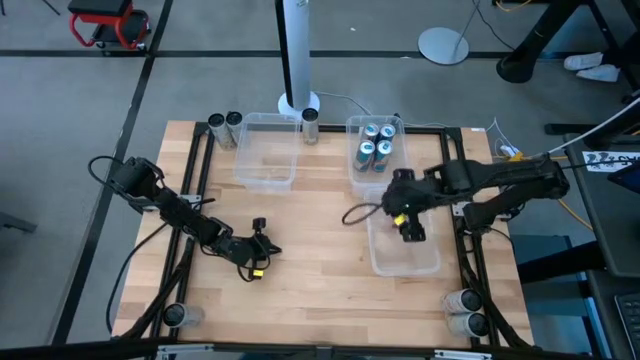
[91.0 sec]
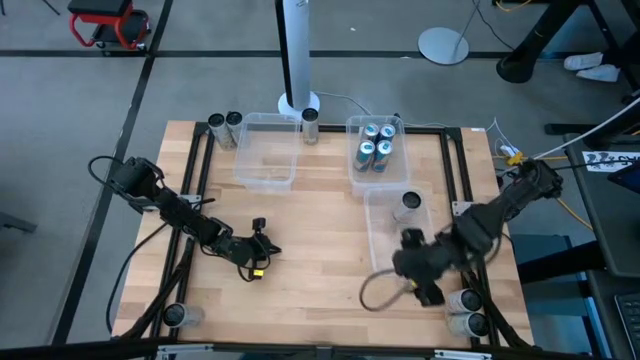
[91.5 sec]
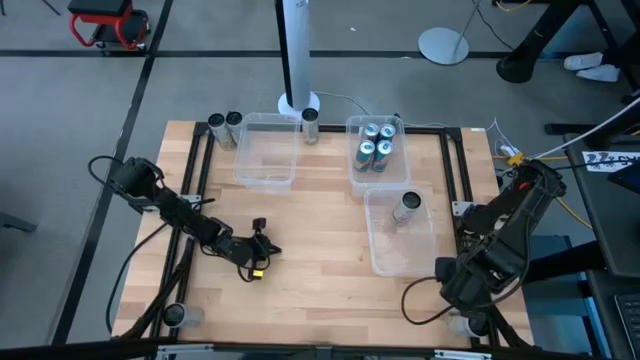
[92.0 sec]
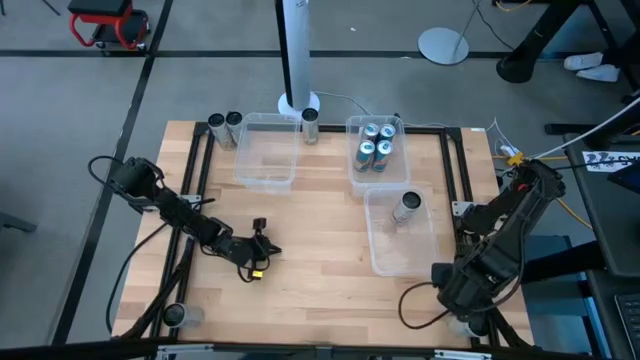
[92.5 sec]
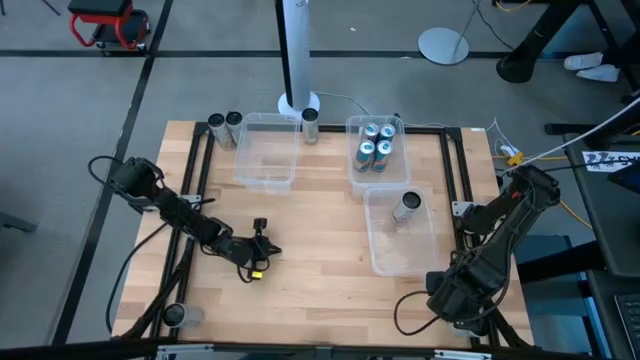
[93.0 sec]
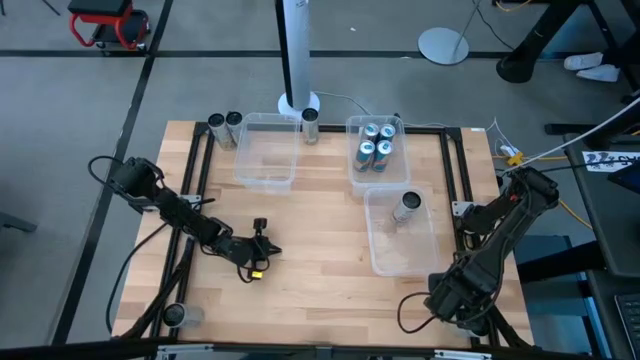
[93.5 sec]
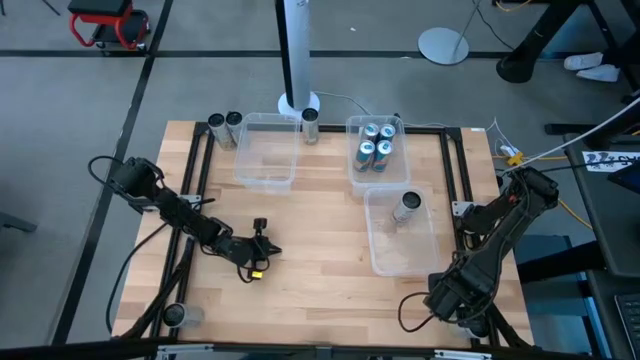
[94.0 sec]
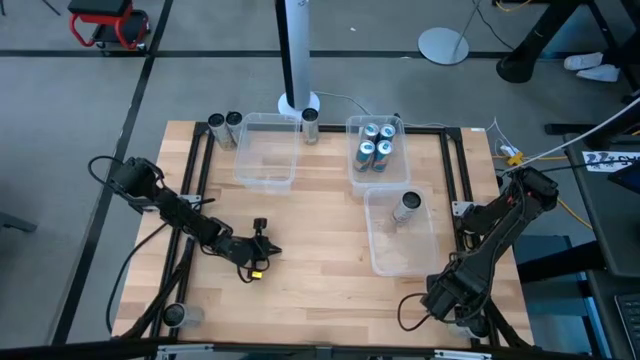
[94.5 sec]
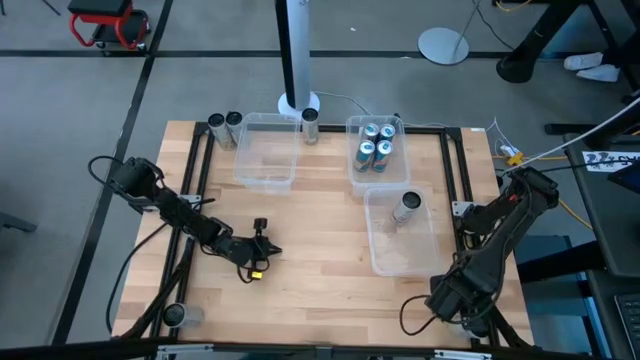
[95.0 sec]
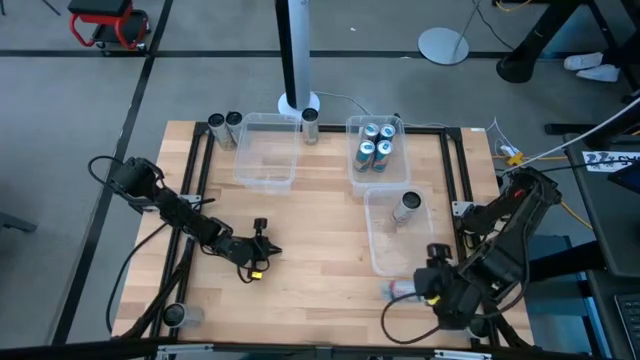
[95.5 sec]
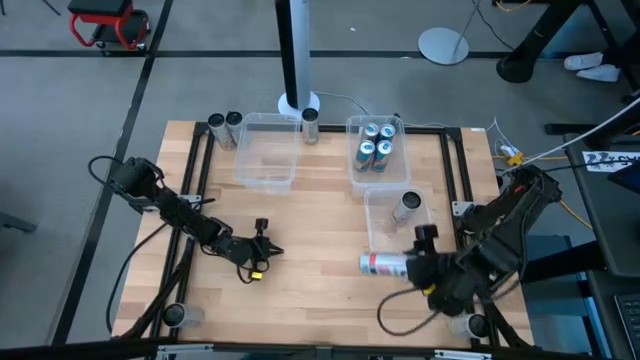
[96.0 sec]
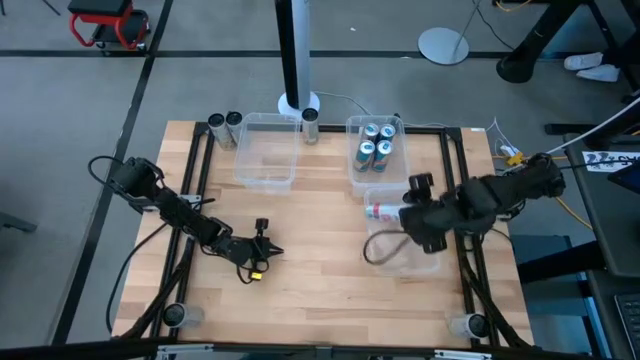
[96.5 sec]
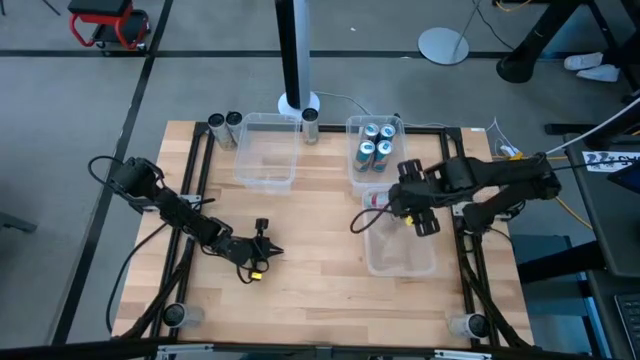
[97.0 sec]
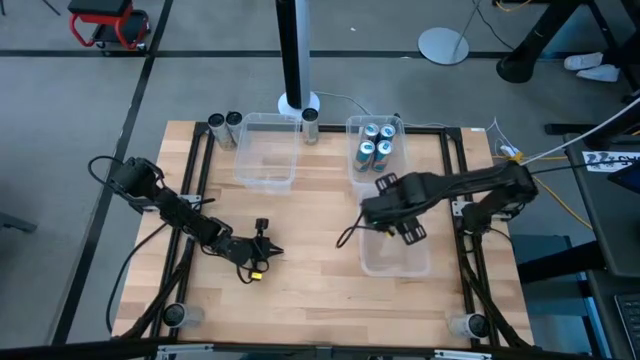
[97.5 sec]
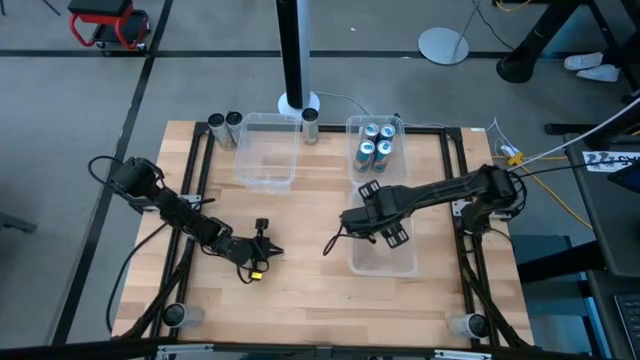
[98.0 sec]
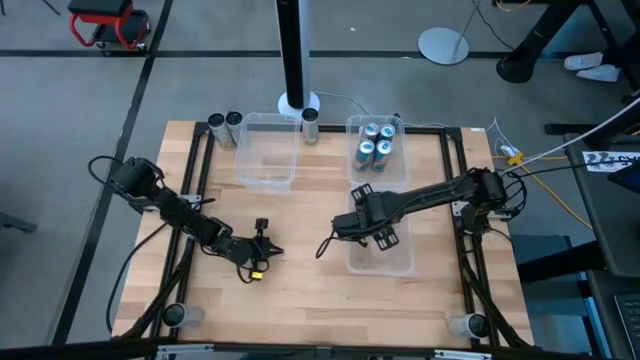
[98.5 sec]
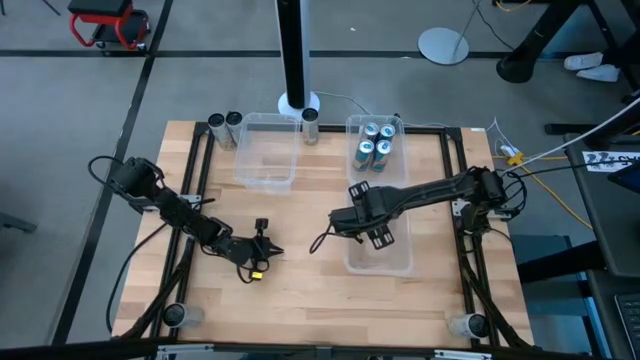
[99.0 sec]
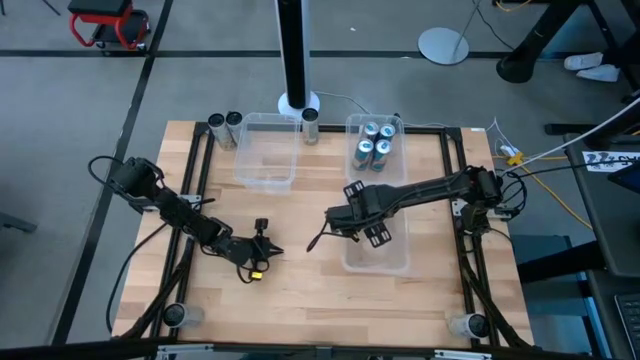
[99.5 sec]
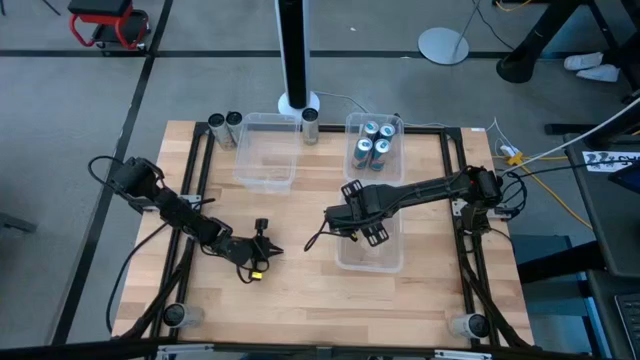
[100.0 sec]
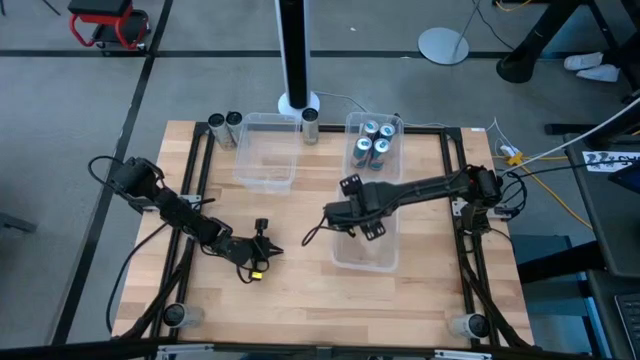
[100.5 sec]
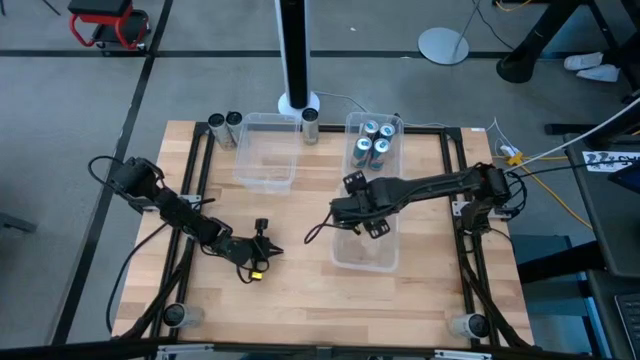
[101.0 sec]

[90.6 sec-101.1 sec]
Task: Sort soda cans
Put the white pink soda can into the bottom right transparent bin

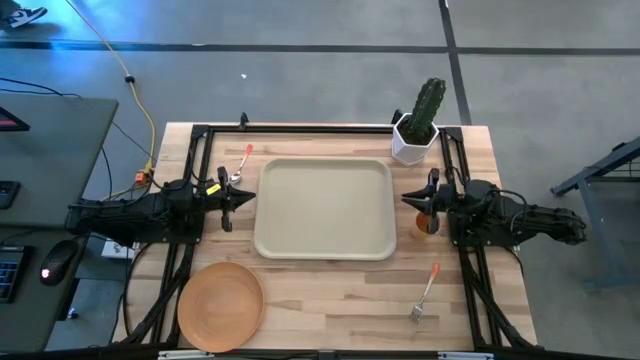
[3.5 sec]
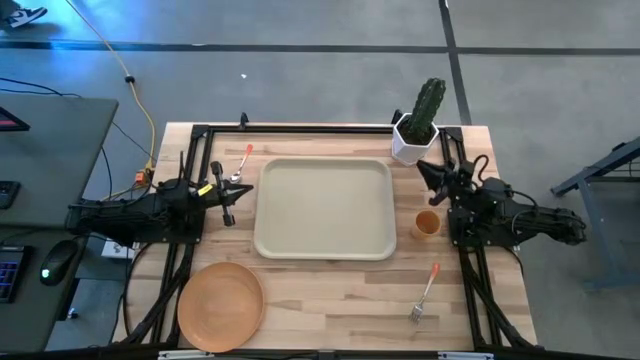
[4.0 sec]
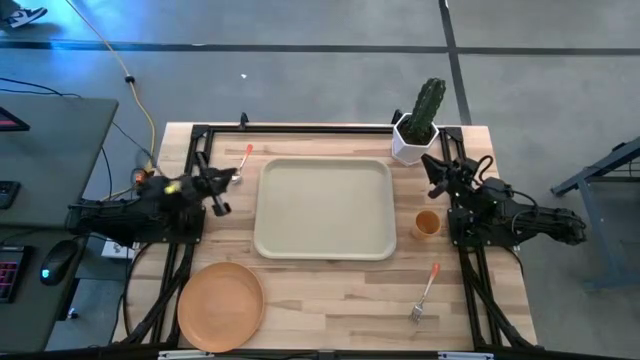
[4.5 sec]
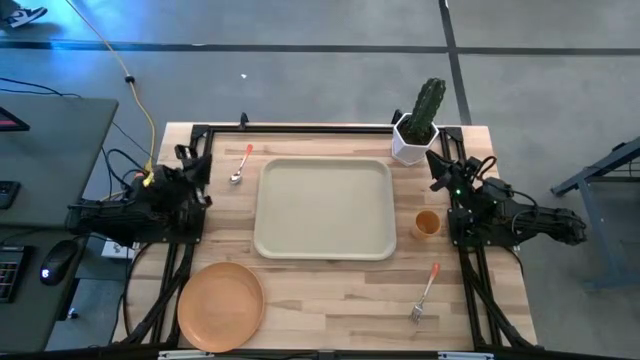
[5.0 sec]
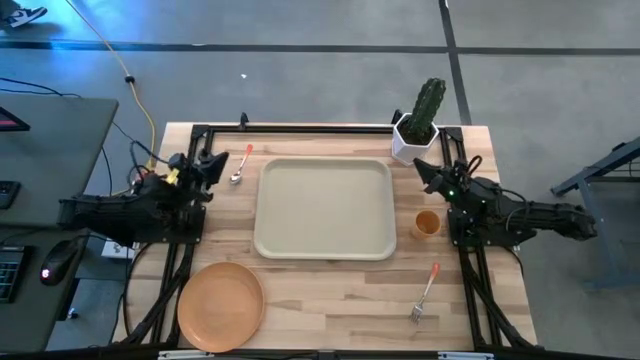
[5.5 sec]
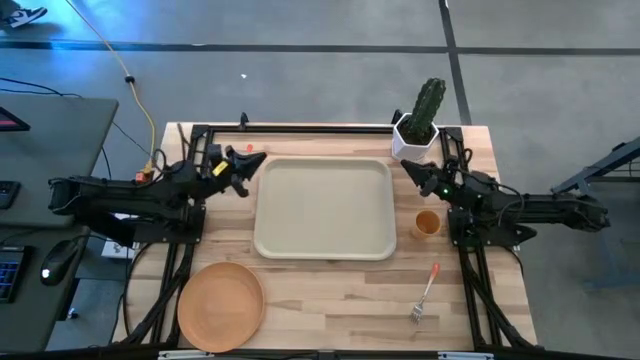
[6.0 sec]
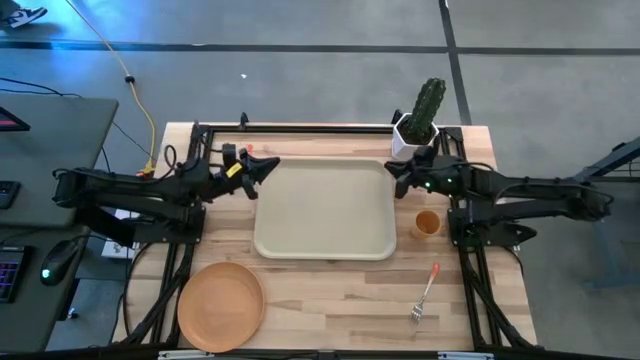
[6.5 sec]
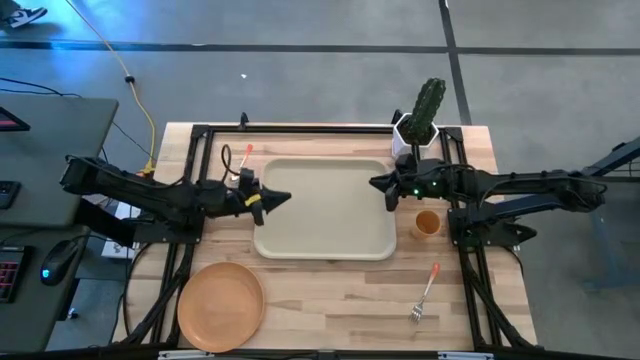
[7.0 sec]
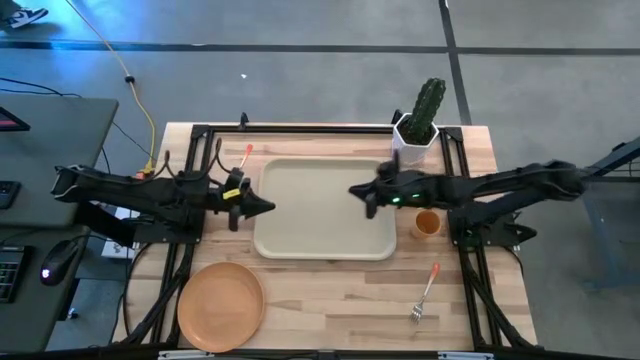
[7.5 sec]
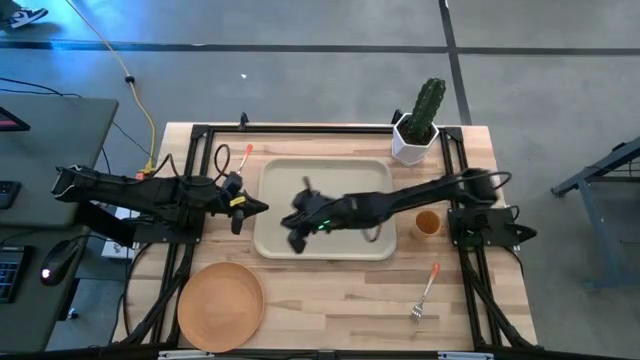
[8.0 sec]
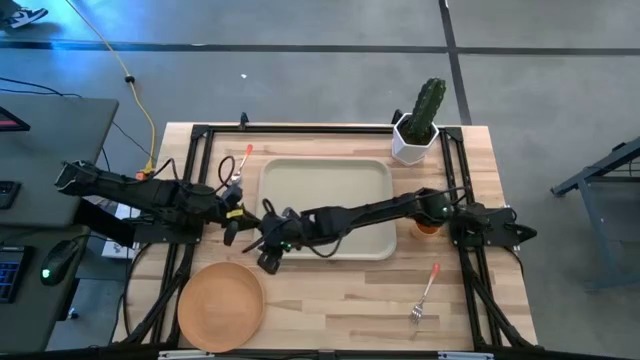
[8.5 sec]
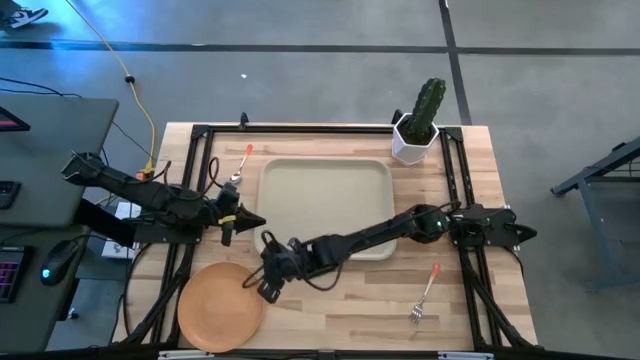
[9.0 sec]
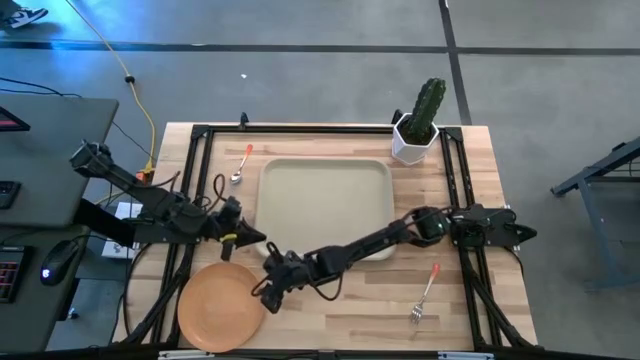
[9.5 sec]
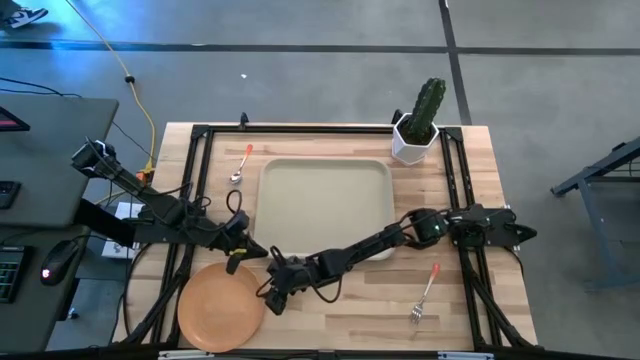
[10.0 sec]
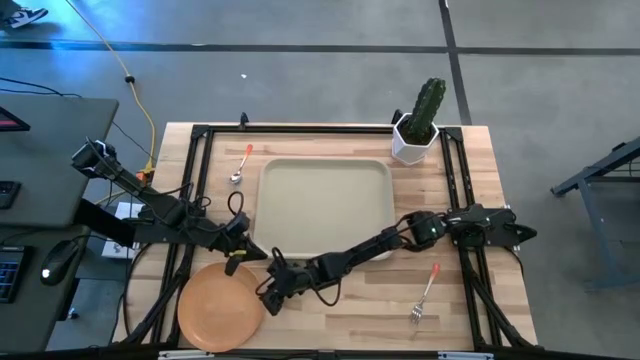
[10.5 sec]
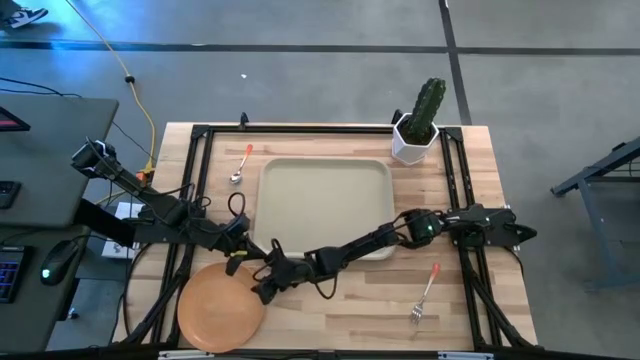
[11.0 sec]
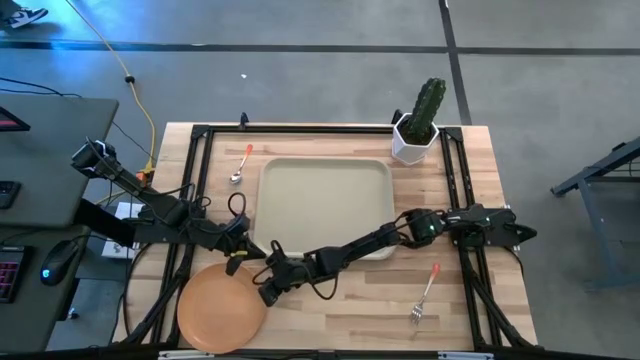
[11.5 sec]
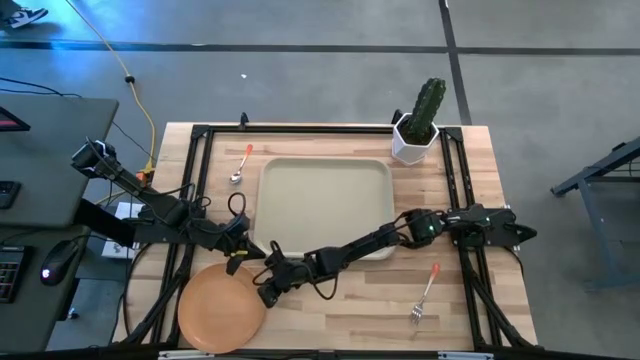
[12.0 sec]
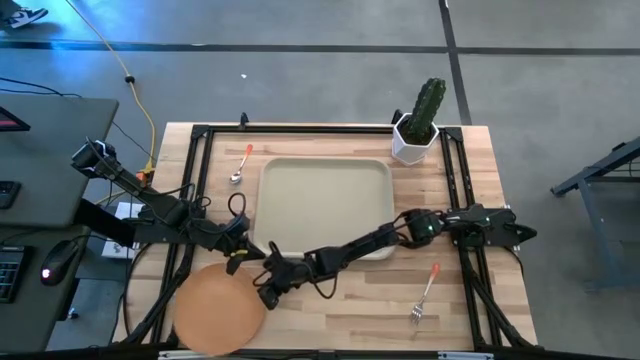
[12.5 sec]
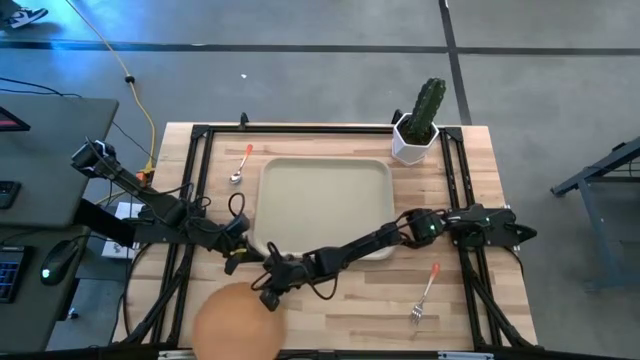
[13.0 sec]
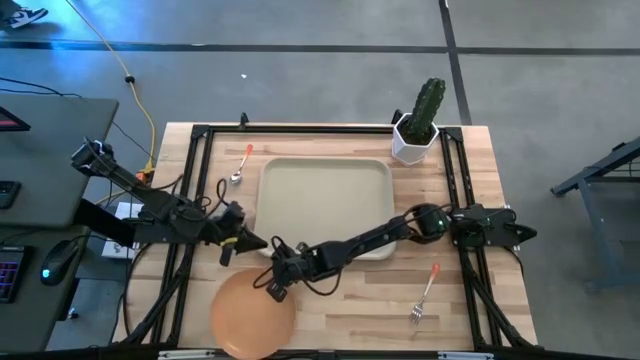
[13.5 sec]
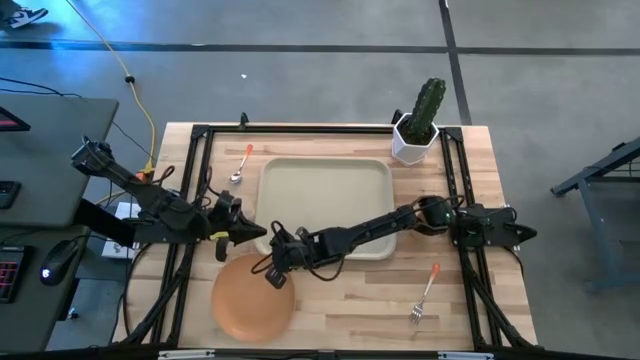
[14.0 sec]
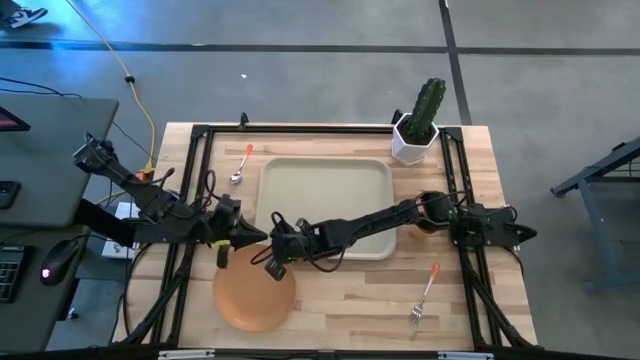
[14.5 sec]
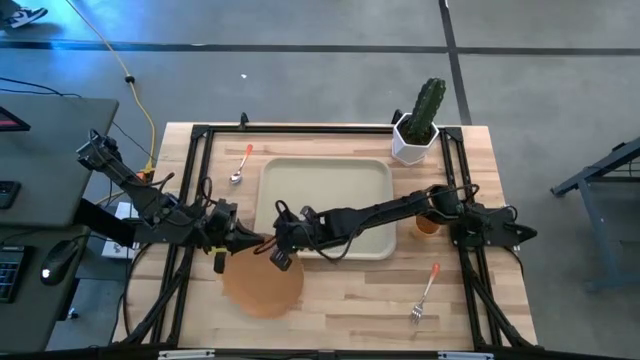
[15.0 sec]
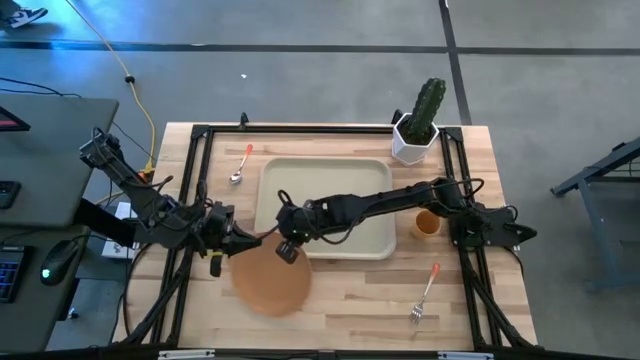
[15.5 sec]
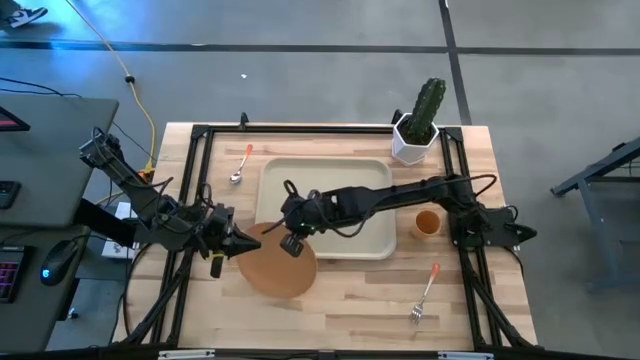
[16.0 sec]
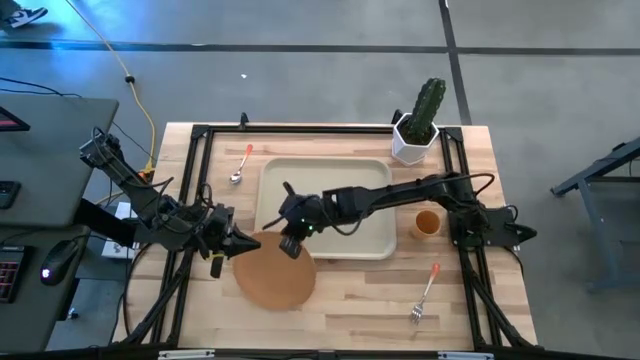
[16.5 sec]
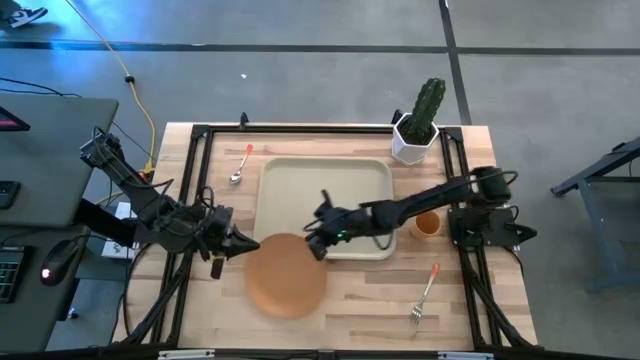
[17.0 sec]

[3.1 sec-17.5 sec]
Task: Pick and place plate/cup/fork/spoon on tray
Put the orange plate on the center of the brown tray
